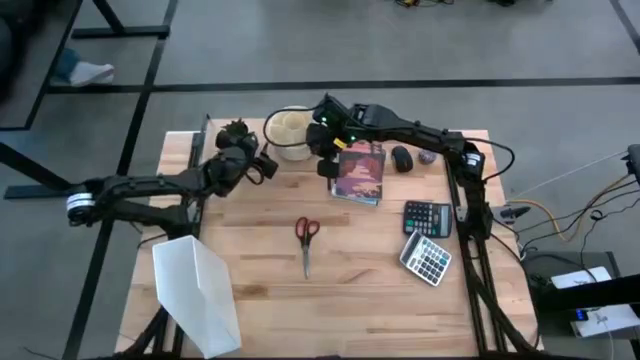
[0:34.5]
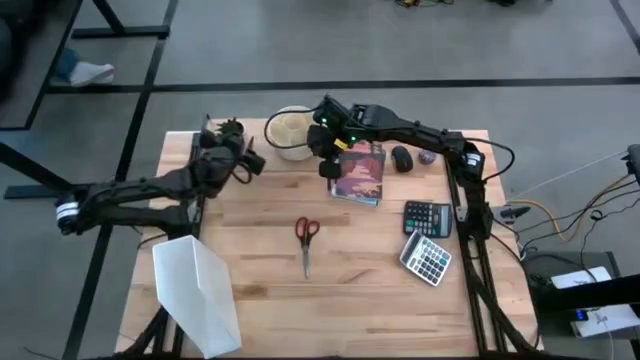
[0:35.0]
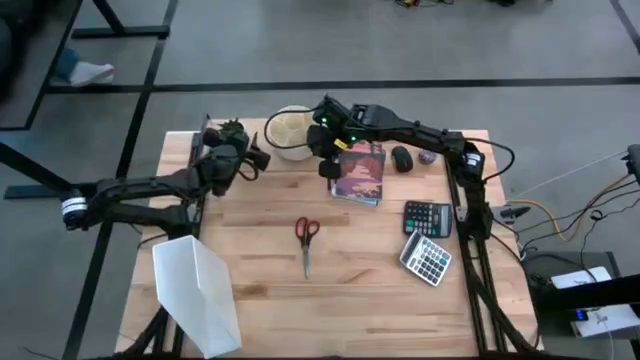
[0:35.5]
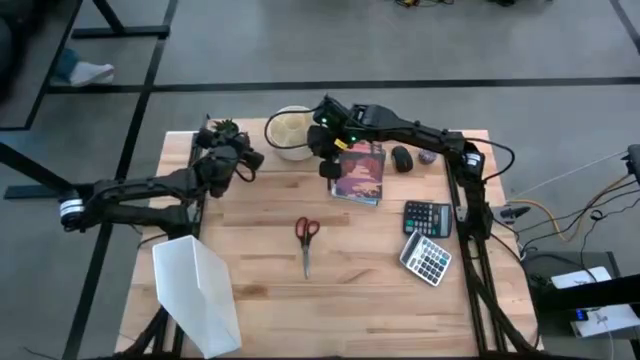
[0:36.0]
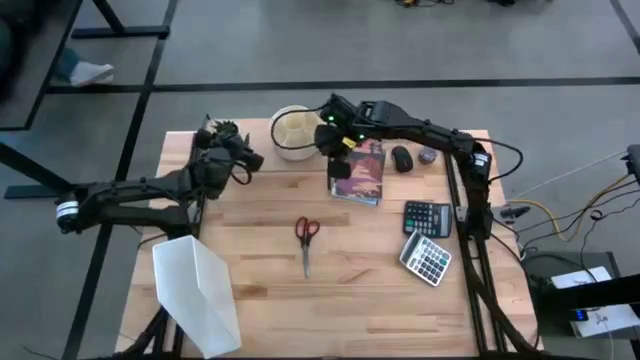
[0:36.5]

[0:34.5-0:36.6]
Task: Stock shelves
Adjust the flower pot on the shelf

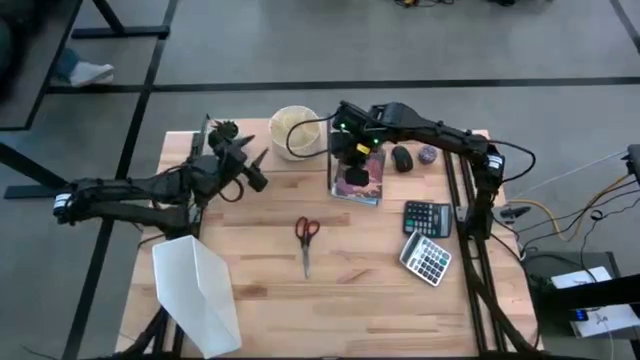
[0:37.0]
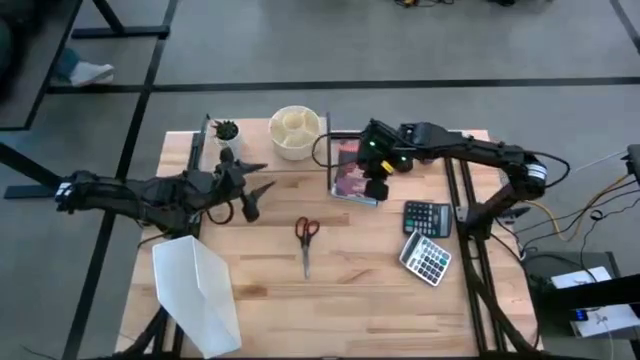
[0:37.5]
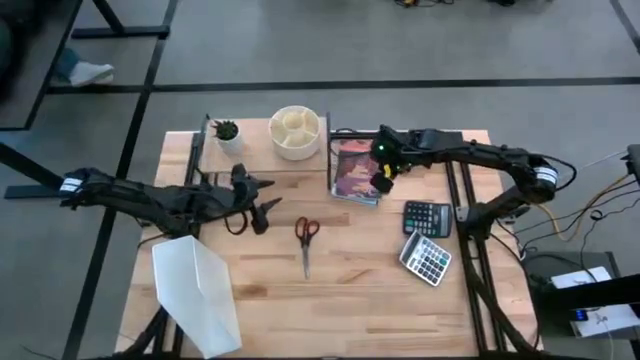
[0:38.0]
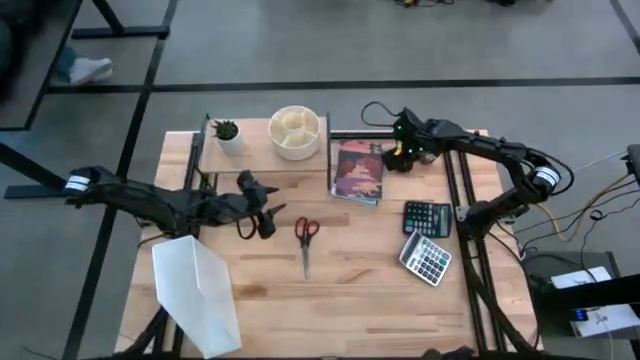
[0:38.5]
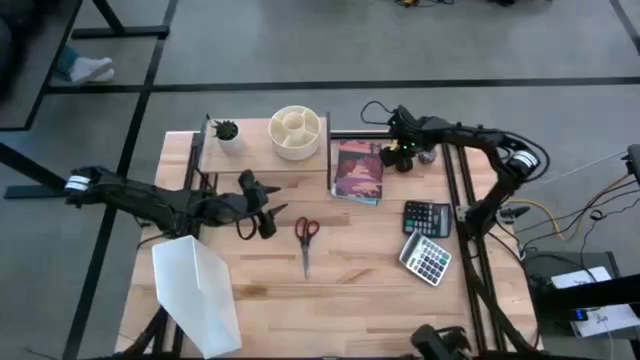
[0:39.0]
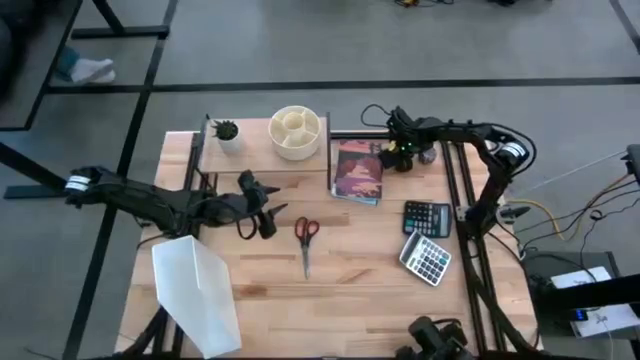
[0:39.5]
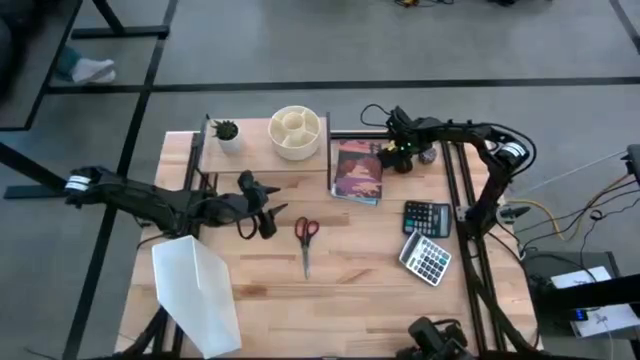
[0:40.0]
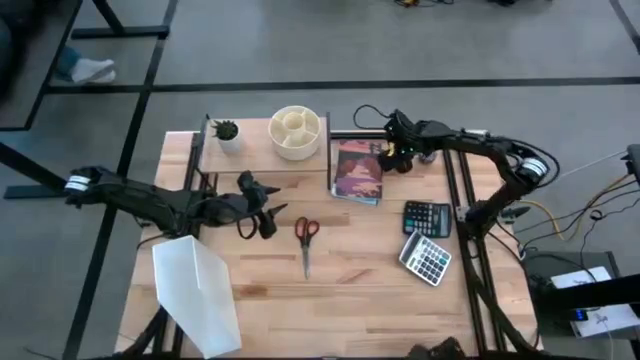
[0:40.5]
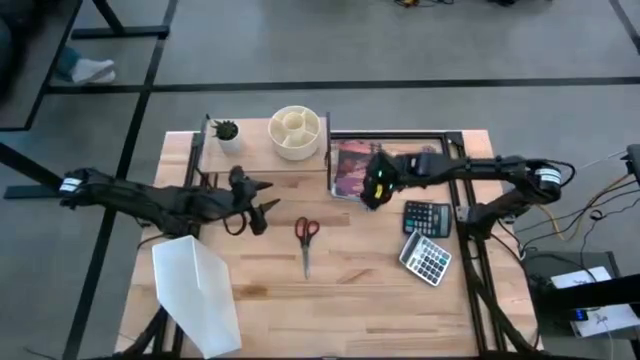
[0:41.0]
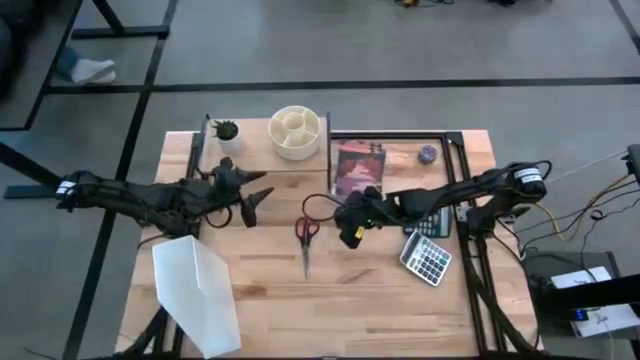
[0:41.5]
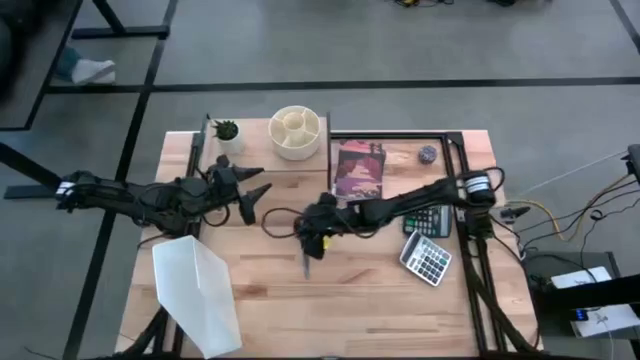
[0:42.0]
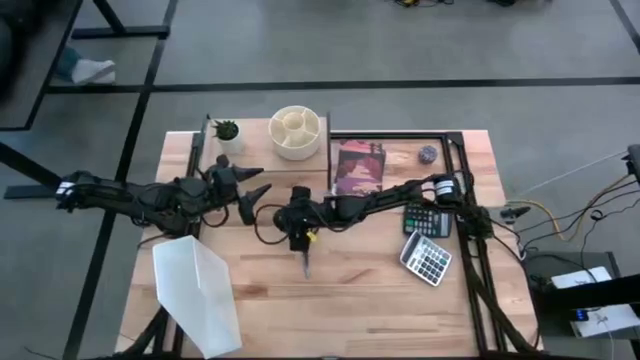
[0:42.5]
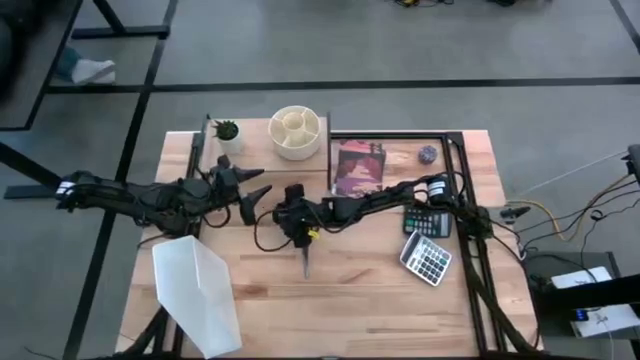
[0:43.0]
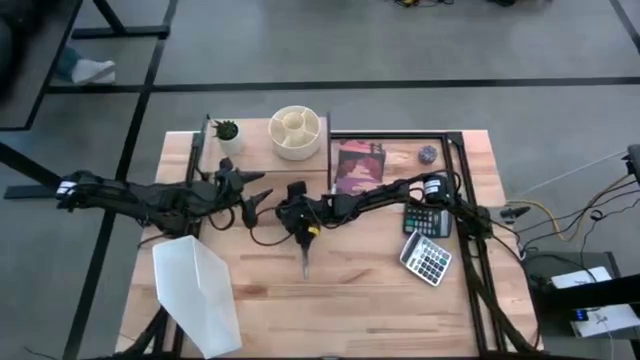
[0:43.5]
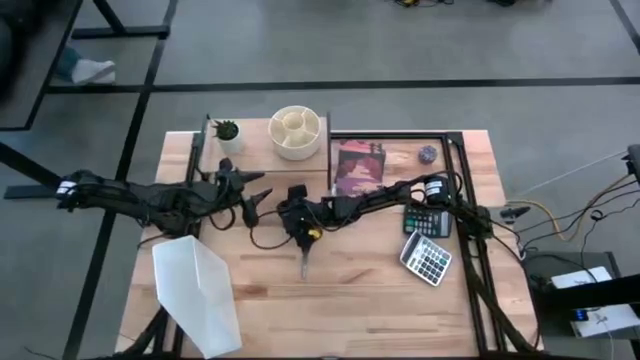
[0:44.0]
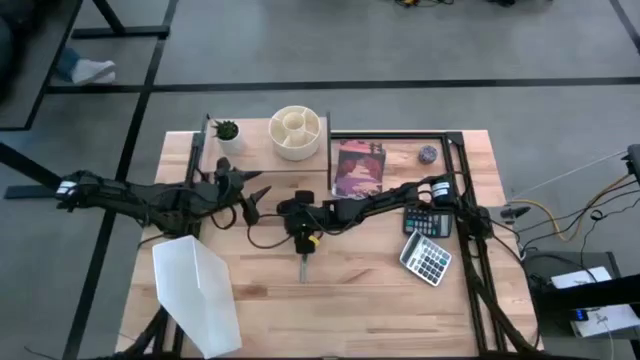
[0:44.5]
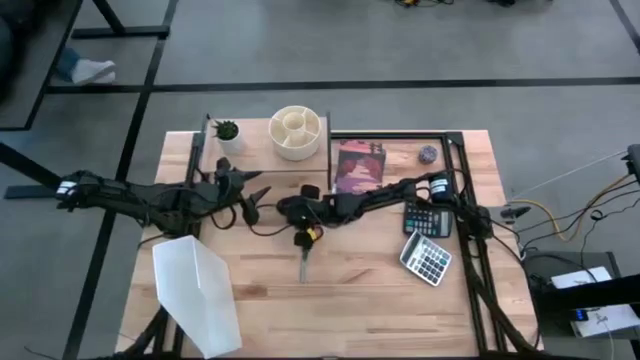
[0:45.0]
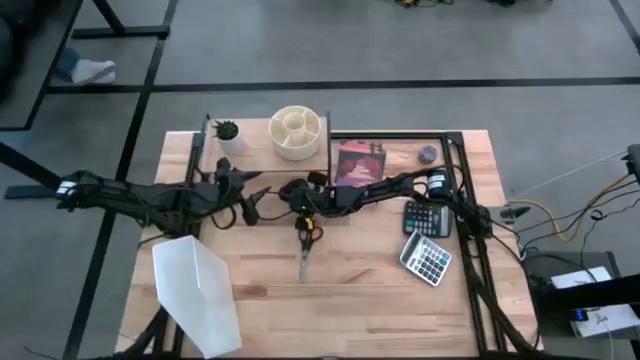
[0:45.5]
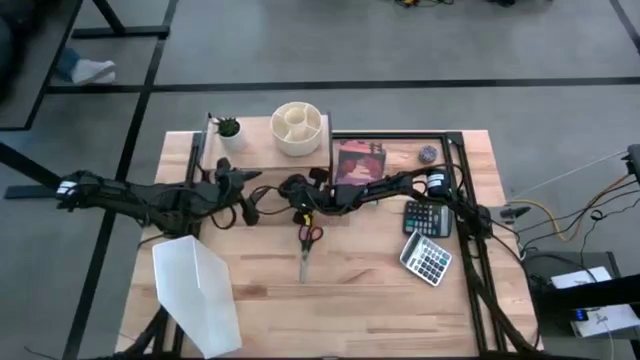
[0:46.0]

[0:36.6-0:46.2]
Put the black mouse under the shelf

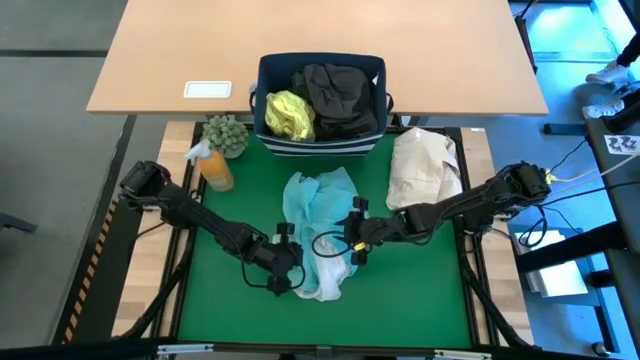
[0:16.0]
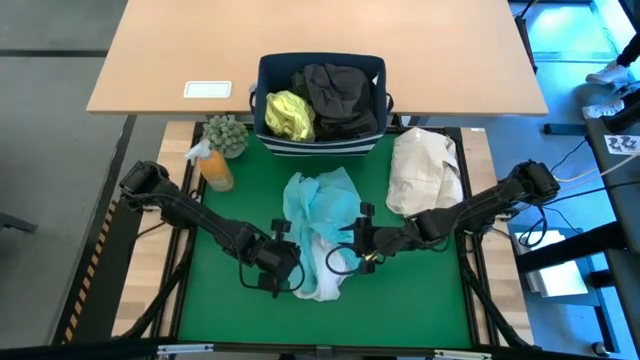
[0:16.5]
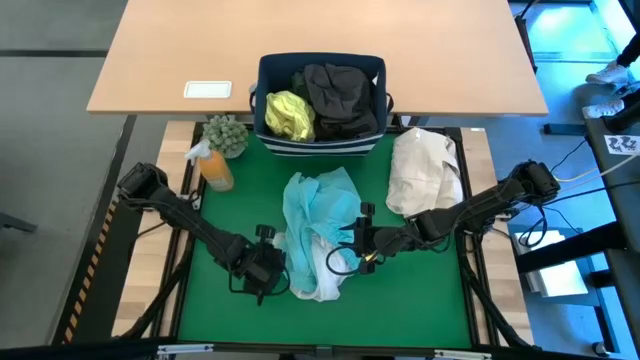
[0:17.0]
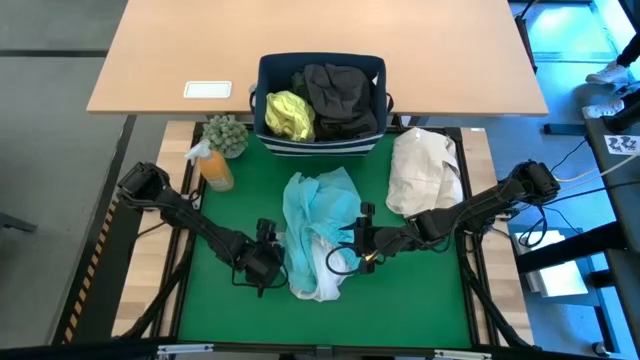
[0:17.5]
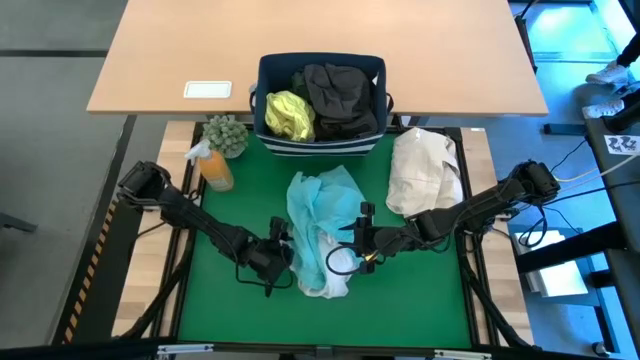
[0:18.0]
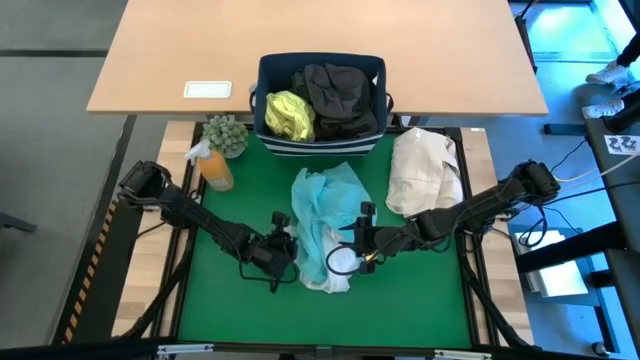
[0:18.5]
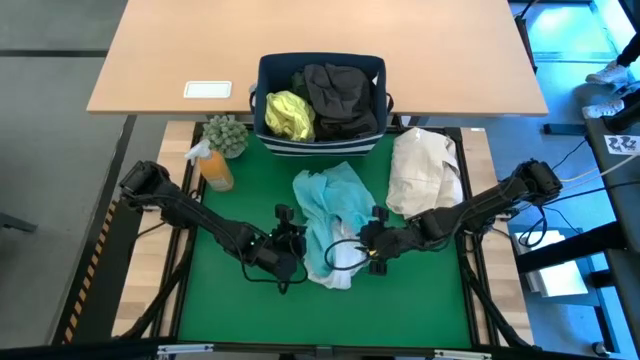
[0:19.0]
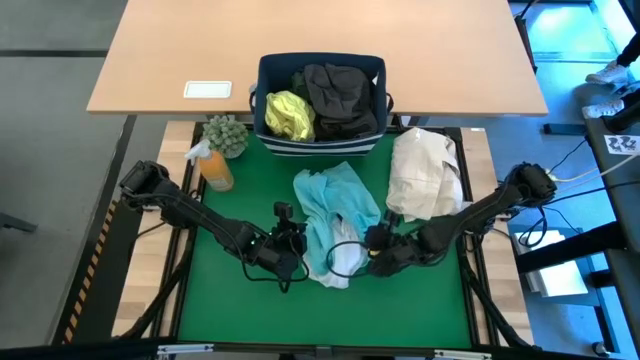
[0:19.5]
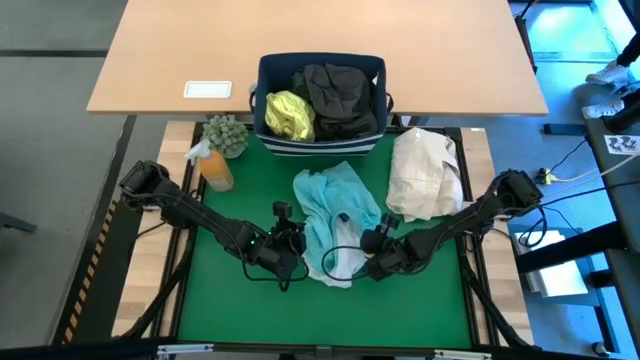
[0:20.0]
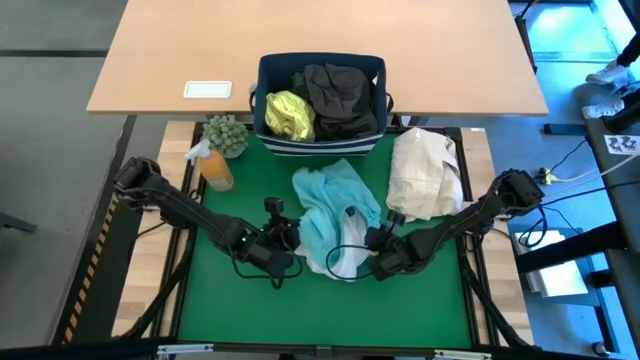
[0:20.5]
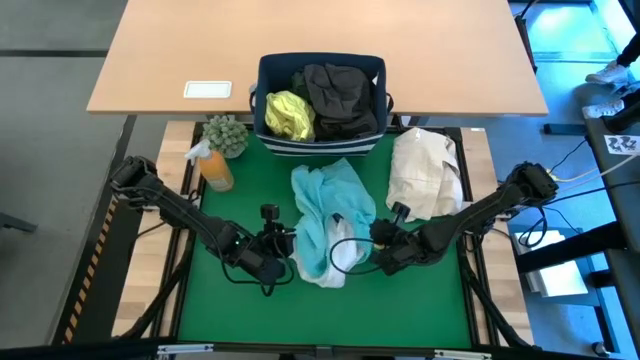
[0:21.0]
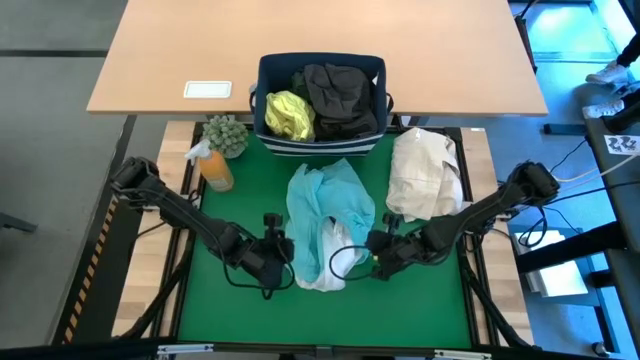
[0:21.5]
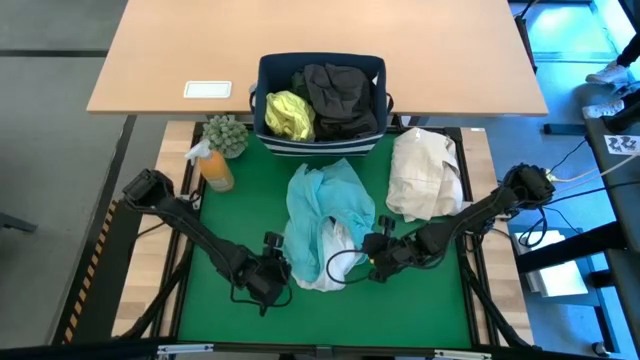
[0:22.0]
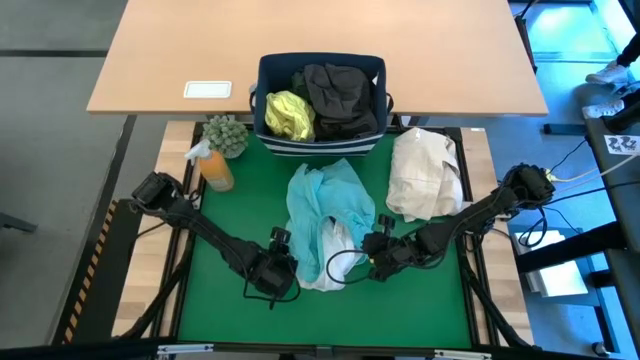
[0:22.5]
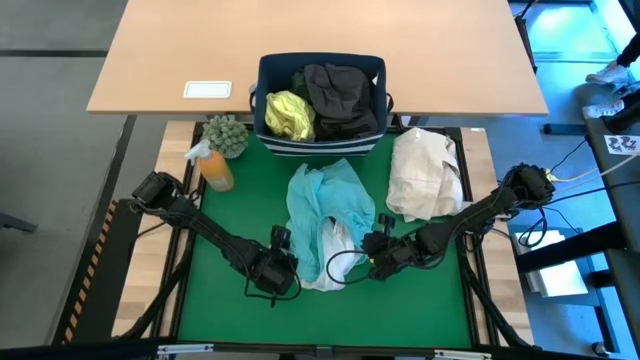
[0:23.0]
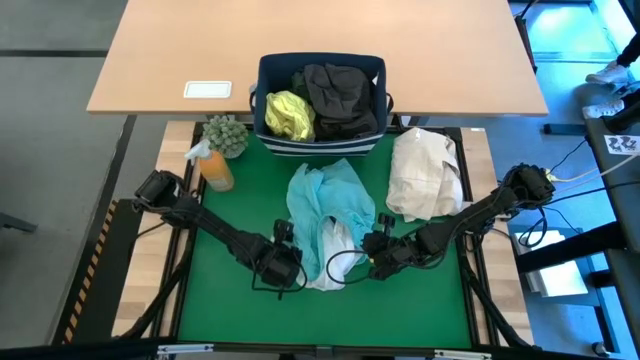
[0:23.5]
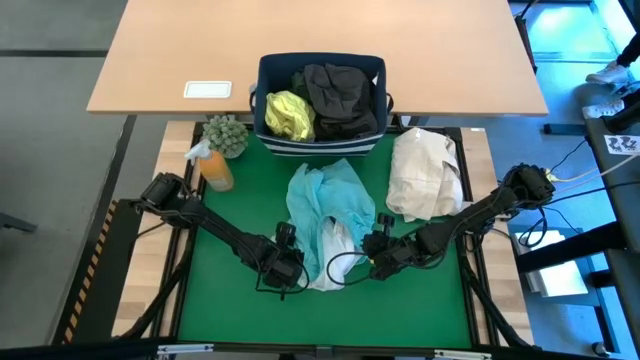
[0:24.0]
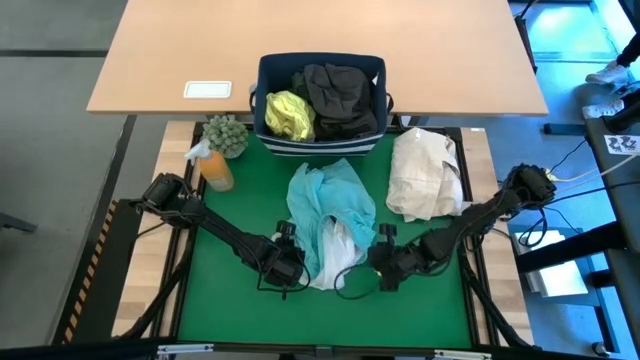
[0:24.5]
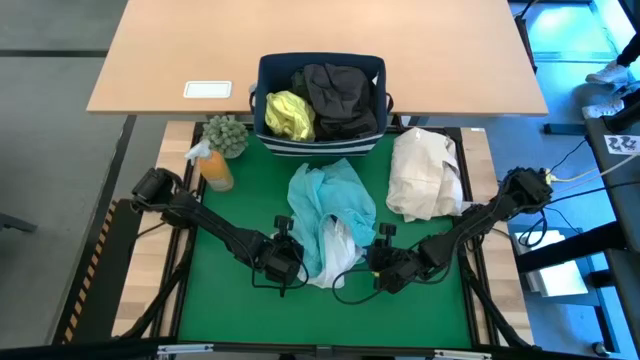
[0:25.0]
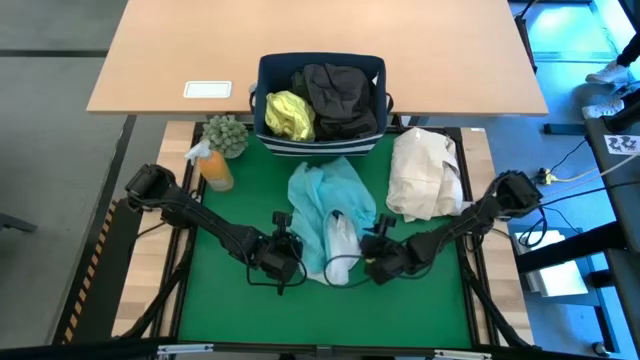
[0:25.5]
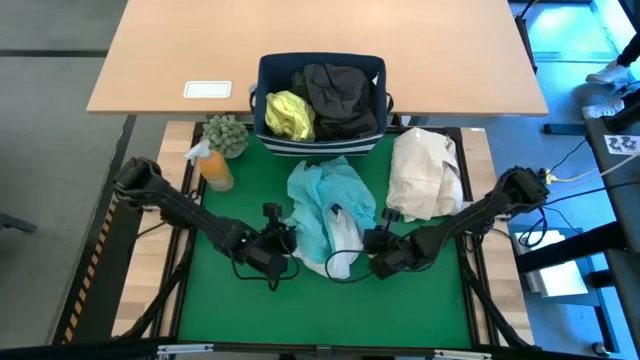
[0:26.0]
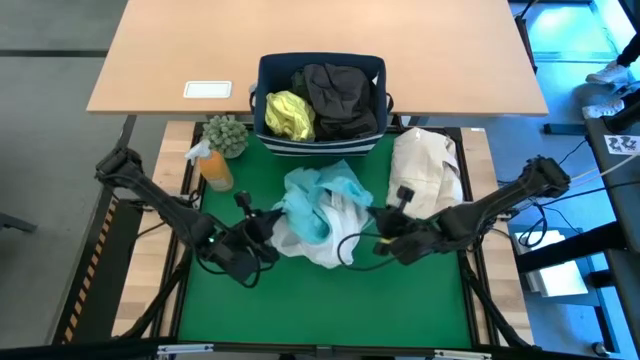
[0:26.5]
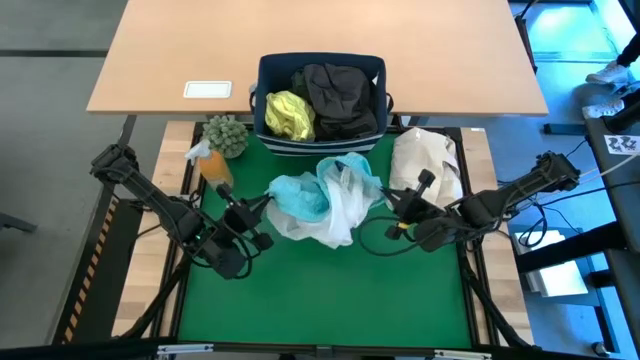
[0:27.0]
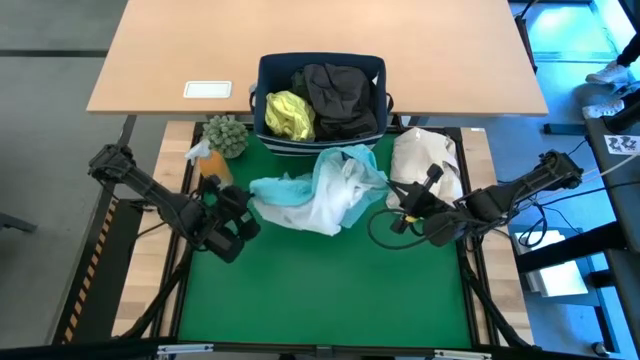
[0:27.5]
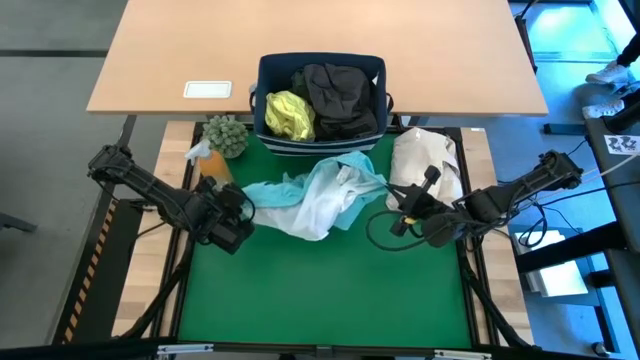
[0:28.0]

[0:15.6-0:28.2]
Task: Fold laundry
Fold the blue shorts
